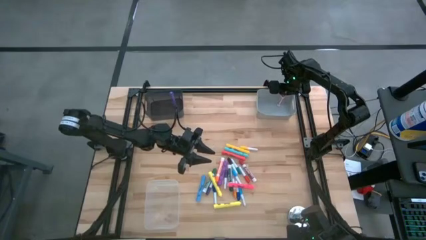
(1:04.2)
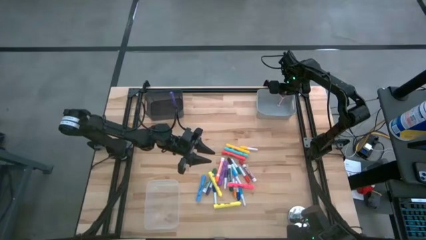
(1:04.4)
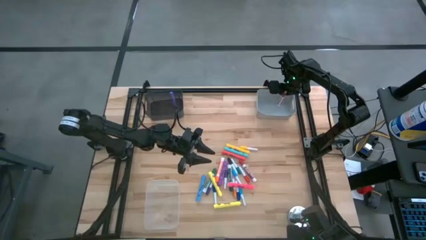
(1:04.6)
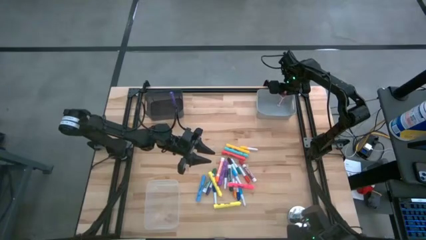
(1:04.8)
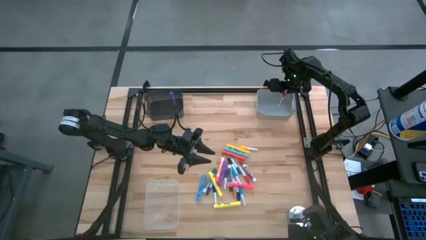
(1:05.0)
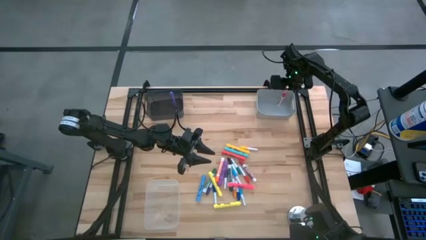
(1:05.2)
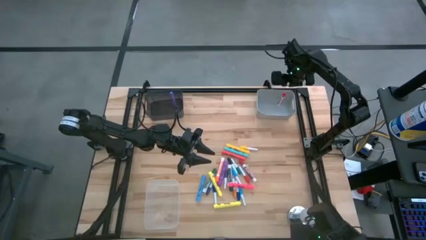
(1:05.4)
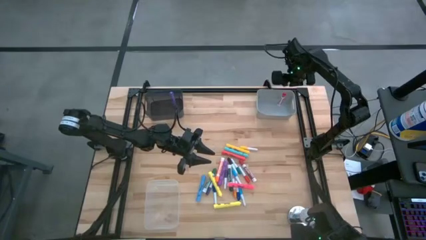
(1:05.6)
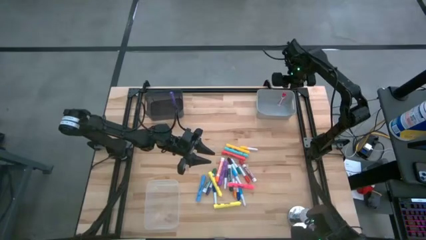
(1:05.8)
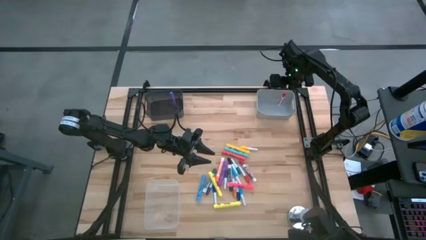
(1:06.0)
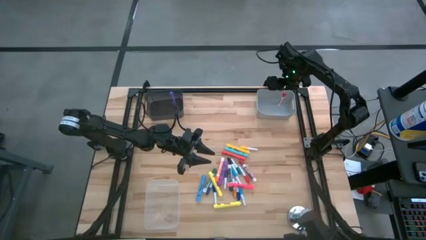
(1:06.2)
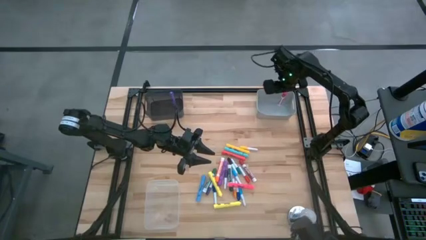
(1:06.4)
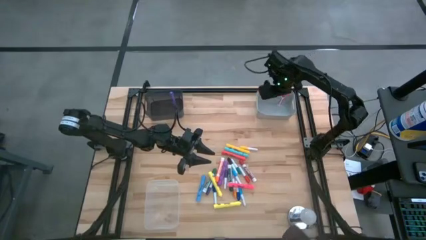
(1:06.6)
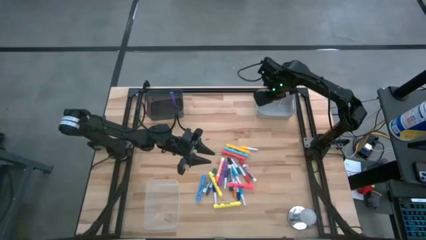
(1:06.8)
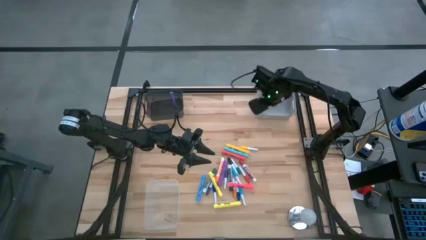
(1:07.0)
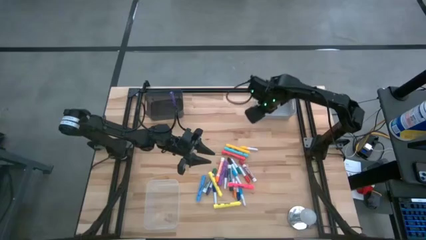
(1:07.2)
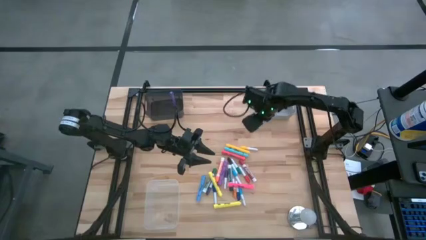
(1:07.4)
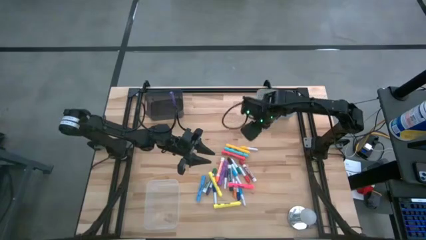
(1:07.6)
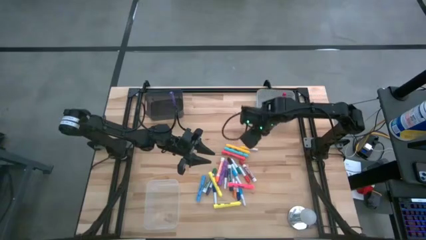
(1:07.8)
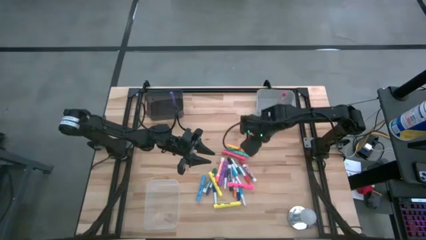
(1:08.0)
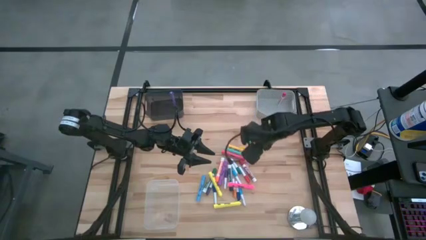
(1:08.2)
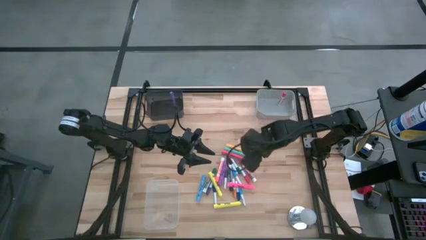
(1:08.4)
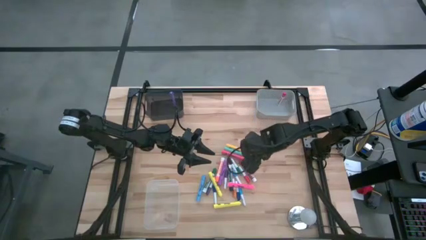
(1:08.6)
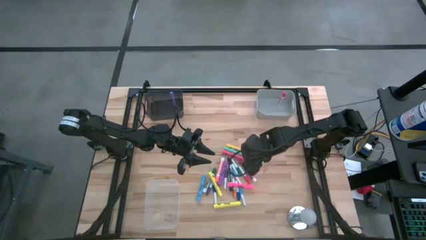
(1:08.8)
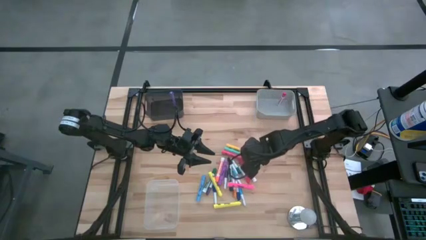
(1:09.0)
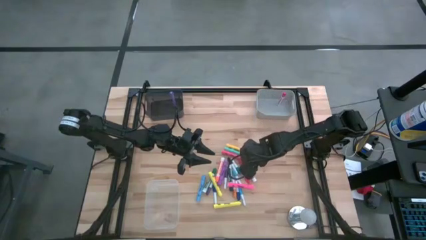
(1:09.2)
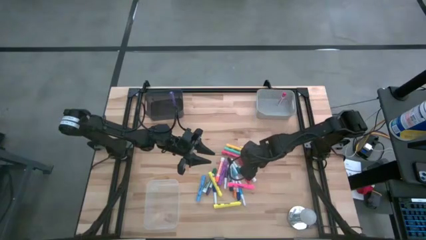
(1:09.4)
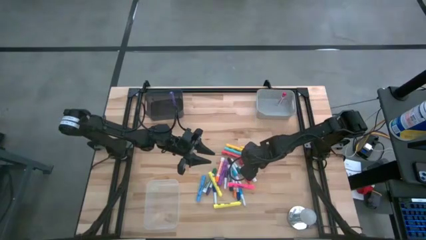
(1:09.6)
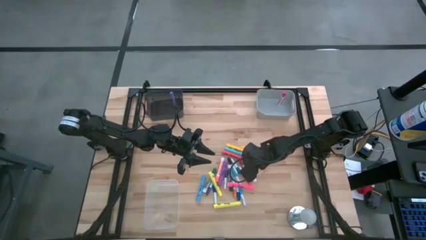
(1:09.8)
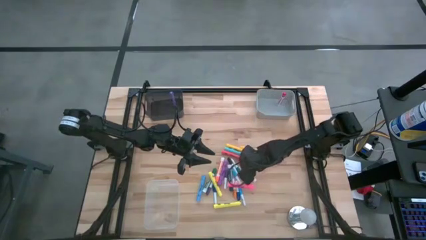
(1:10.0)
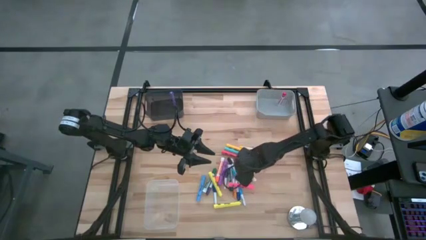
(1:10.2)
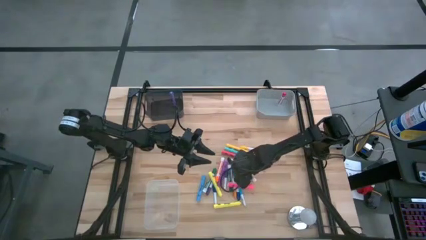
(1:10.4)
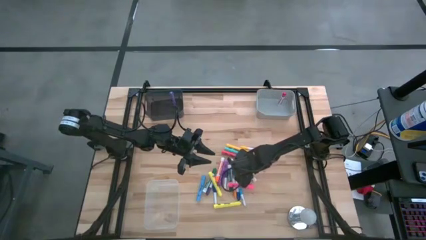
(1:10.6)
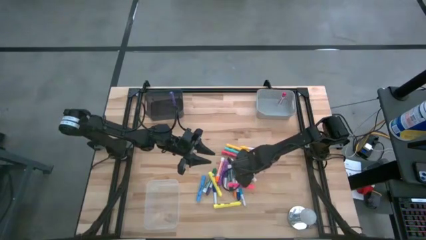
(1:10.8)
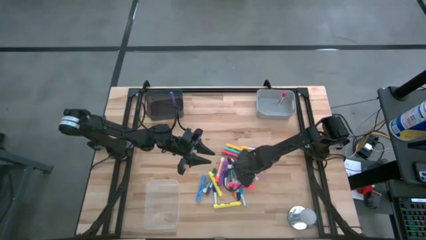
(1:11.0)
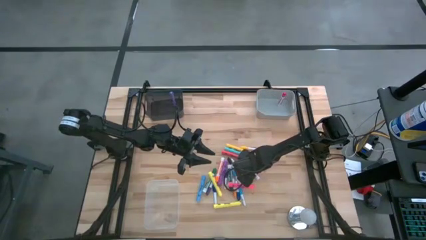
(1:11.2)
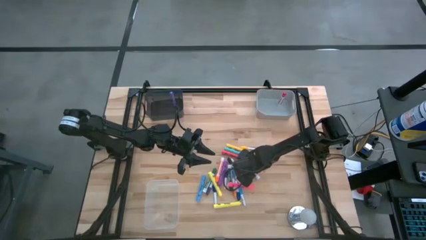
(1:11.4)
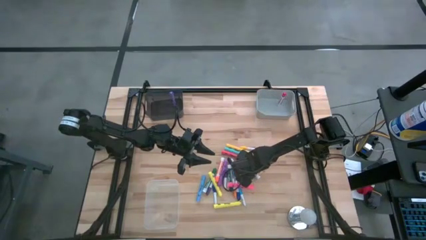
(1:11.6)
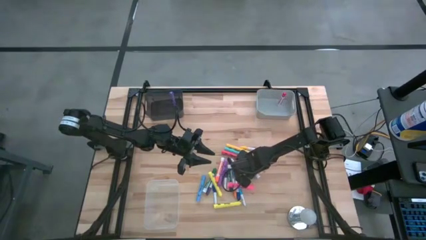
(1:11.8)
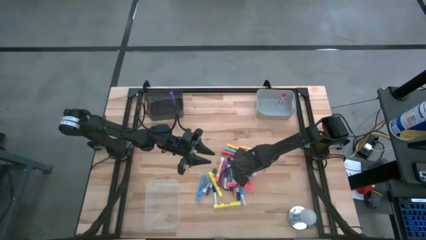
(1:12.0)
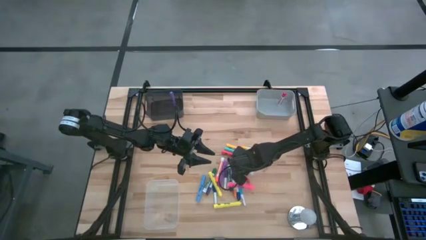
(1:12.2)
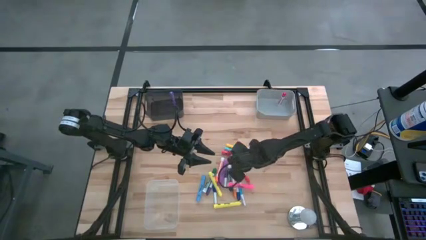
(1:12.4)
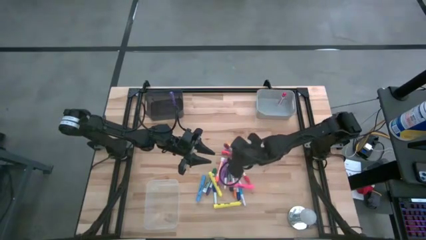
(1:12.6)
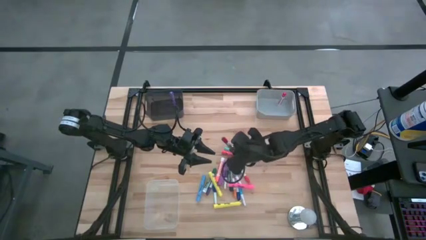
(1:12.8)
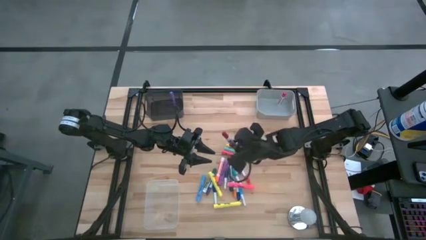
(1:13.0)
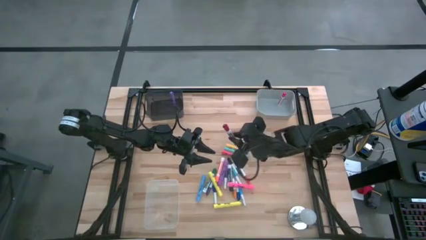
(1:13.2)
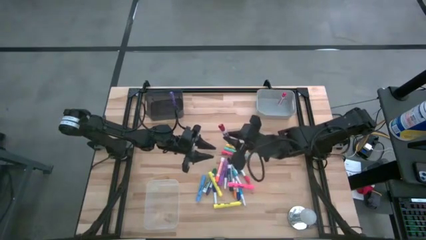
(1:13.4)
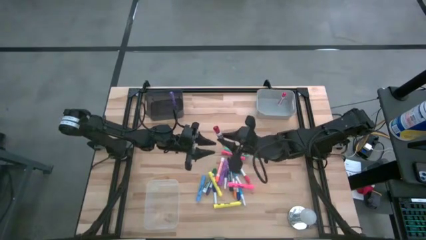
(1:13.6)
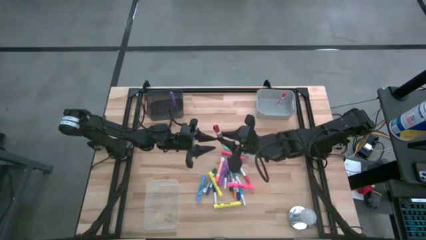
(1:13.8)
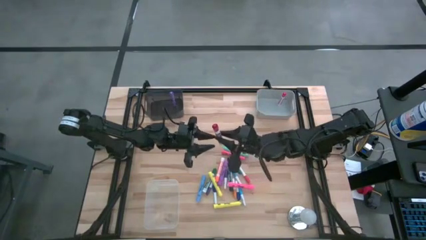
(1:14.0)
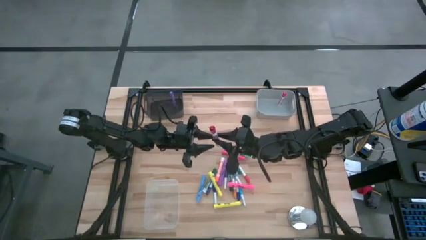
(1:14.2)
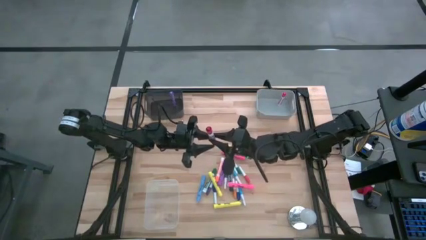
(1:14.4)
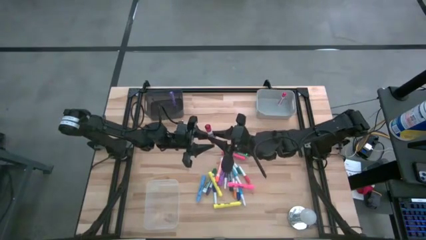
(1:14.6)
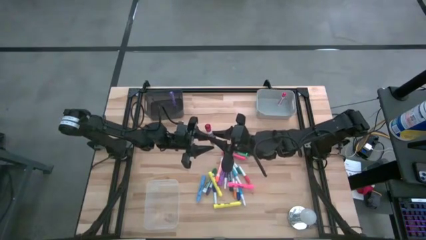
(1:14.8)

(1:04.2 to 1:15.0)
Task: Pick & Place Markers
Put the red marker pen into the gray bin

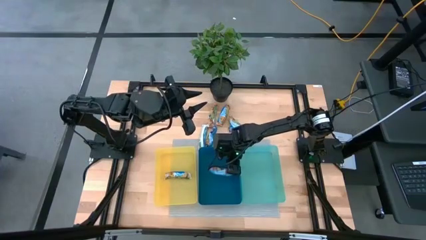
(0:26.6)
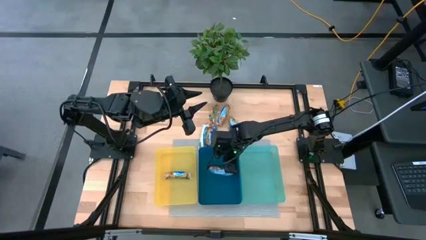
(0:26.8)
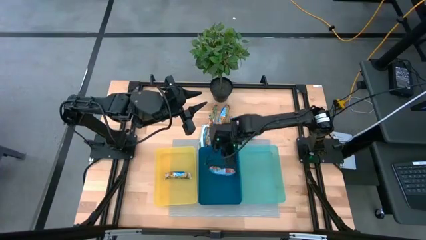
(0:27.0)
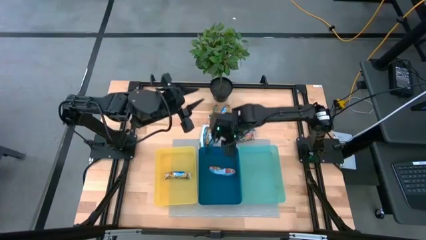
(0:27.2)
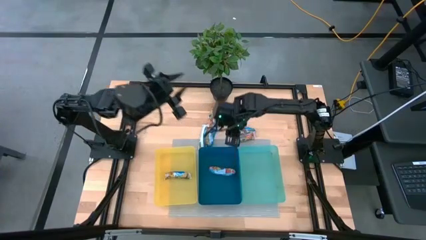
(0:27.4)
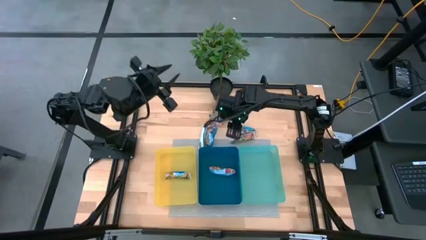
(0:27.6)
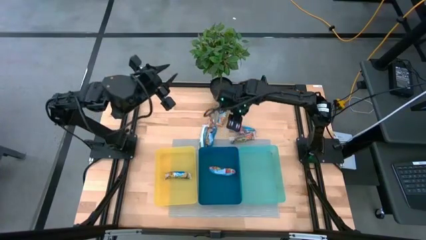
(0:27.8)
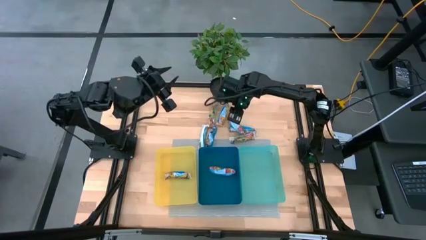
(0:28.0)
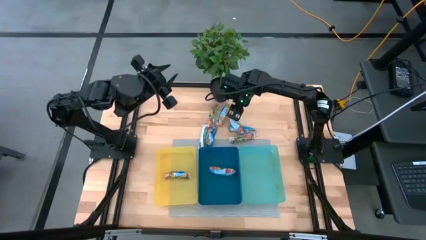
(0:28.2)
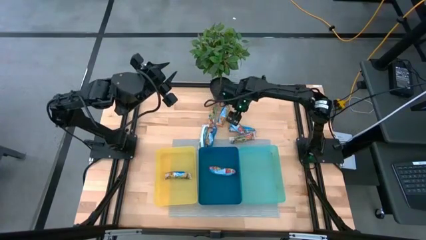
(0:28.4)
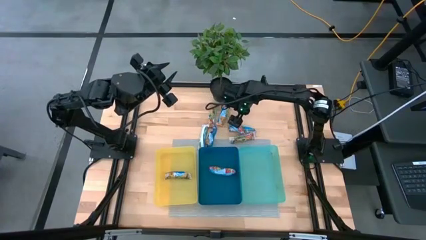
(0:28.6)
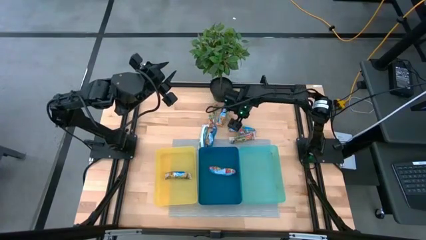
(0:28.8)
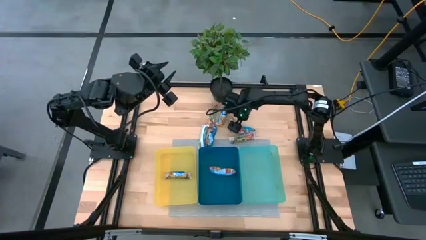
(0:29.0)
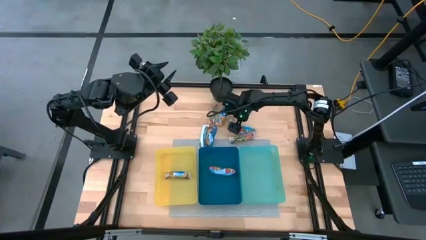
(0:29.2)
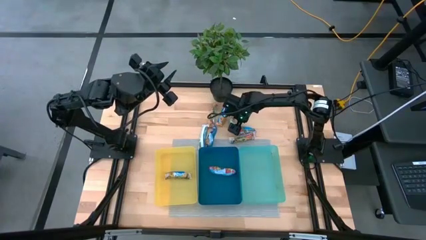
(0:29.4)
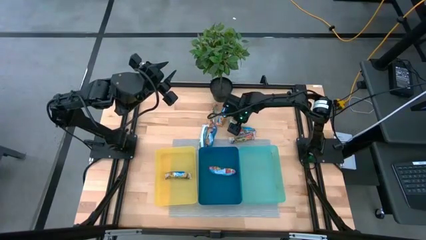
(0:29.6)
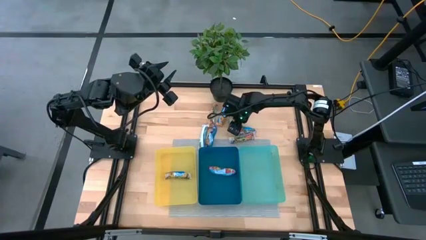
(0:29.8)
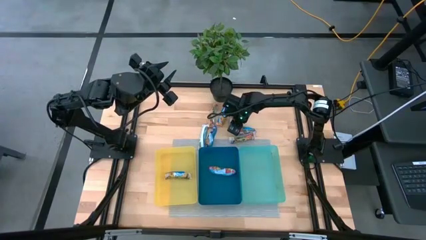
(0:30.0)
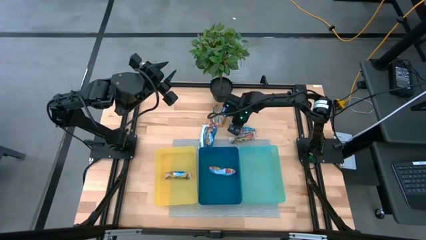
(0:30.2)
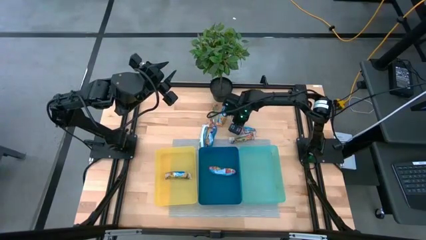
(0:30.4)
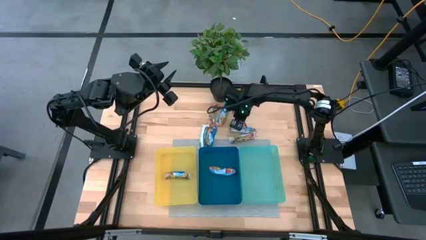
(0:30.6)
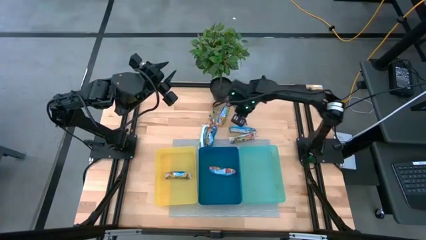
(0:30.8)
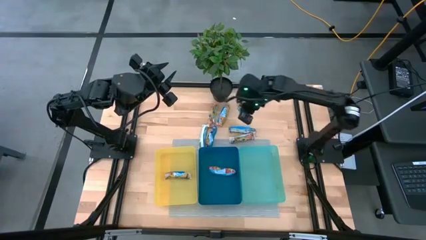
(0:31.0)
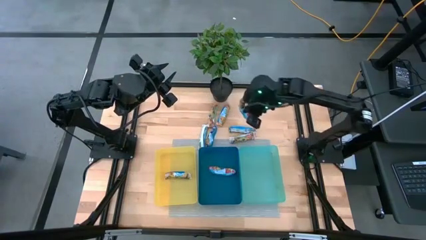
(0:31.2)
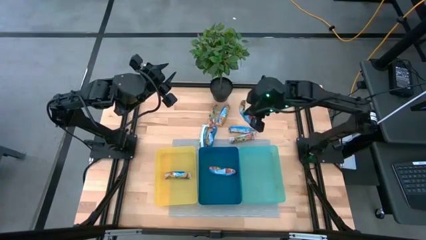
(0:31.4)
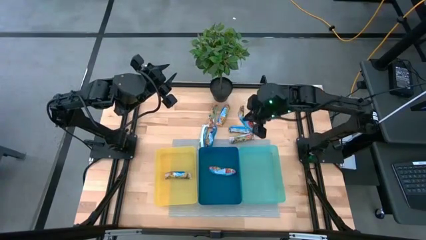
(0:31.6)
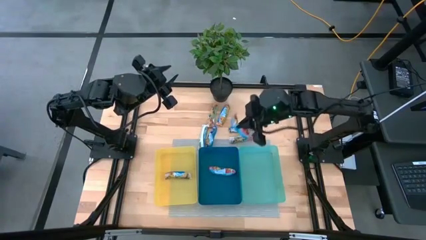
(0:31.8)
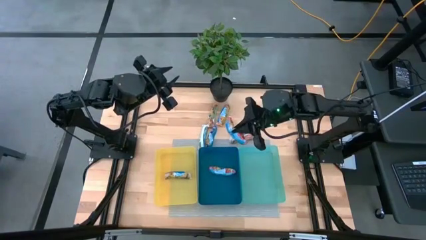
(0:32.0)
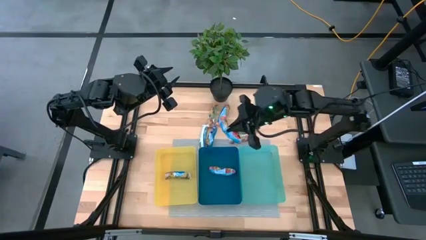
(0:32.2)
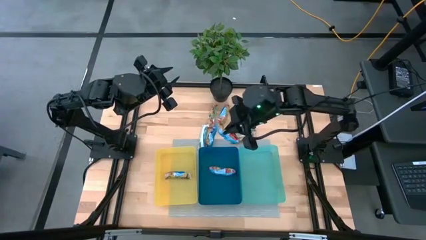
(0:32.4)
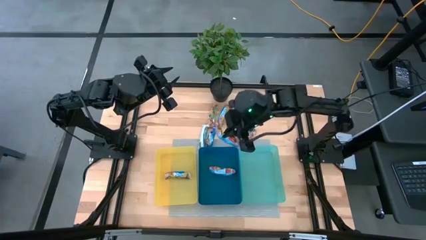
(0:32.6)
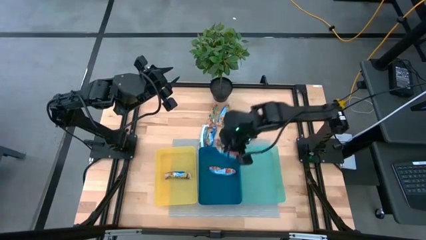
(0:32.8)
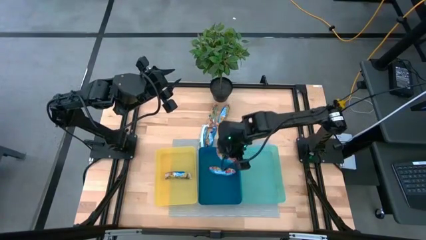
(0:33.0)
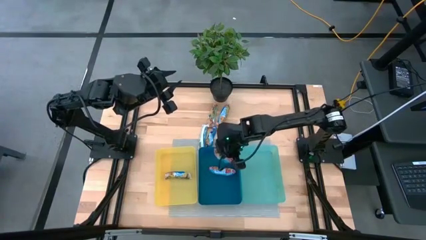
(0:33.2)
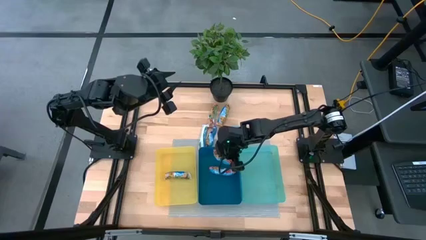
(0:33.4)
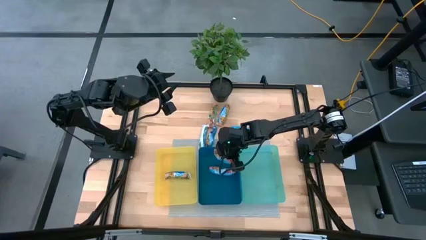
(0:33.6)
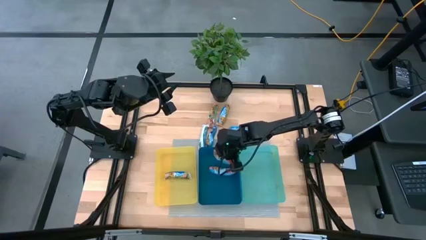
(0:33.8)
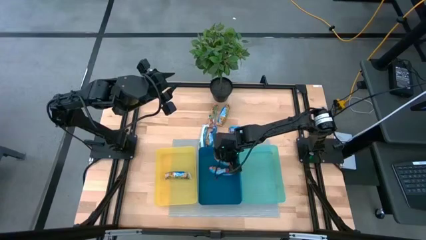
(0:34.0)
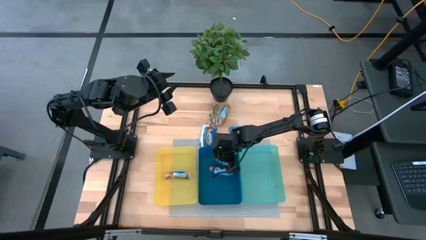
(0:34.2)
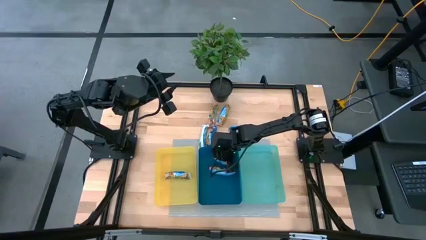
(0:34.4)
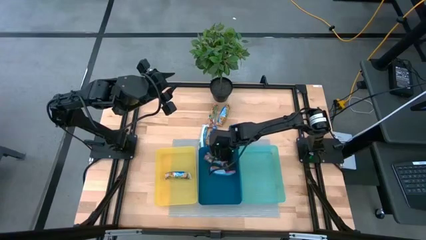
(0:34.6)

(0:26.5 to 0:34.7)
Task: Pick and place Granola Bars by type
Put the red granola bar into the blue bin
